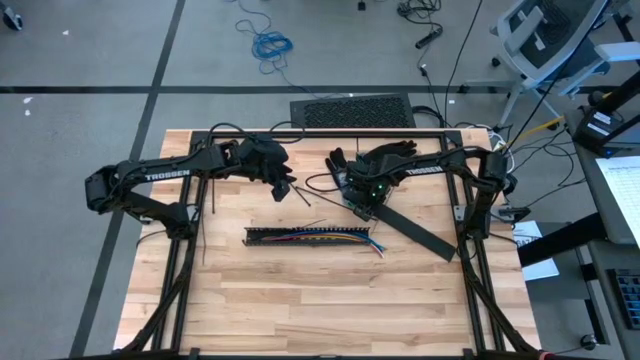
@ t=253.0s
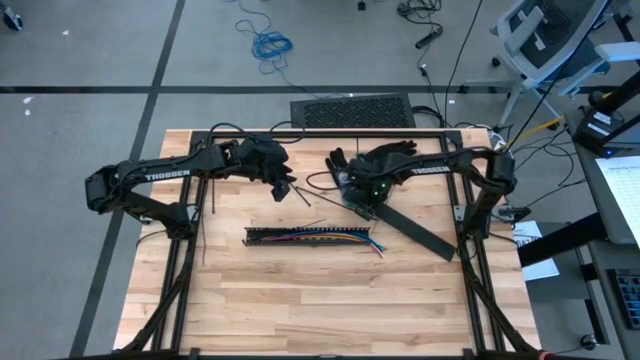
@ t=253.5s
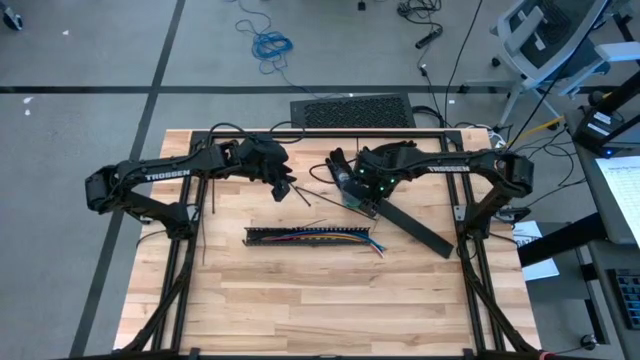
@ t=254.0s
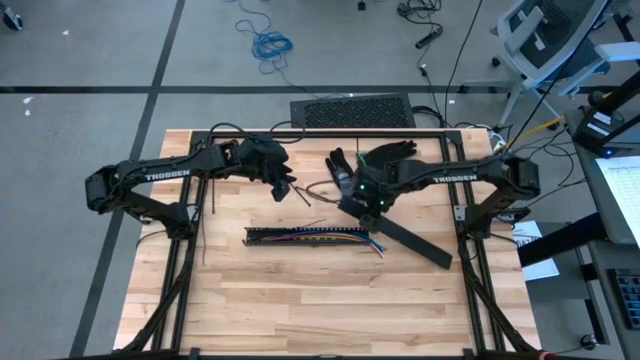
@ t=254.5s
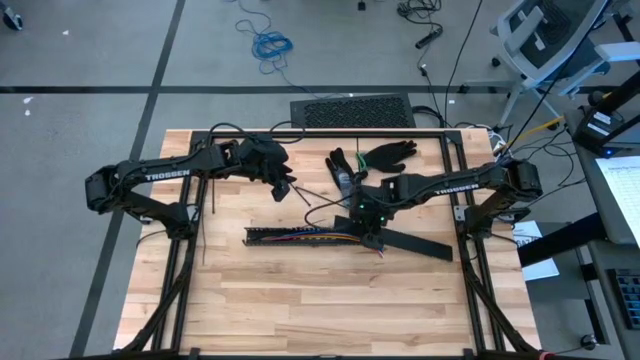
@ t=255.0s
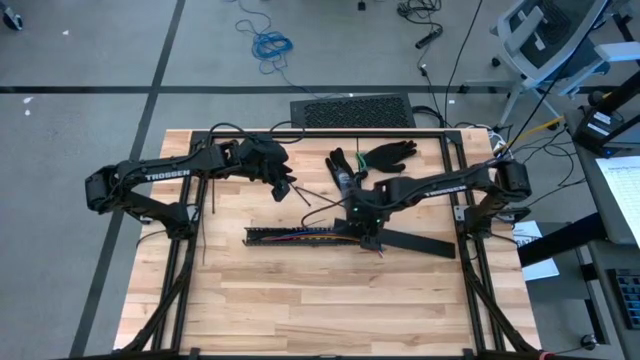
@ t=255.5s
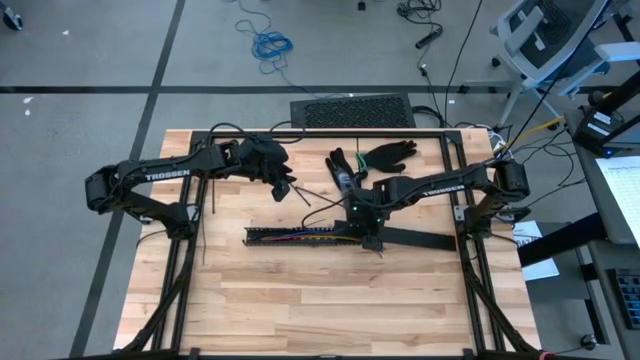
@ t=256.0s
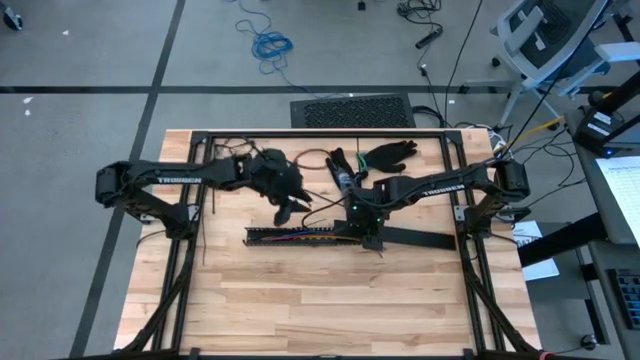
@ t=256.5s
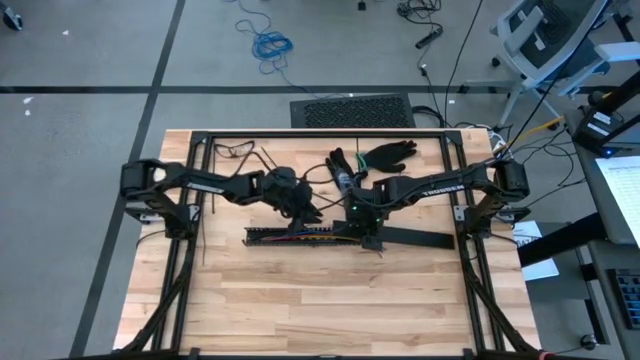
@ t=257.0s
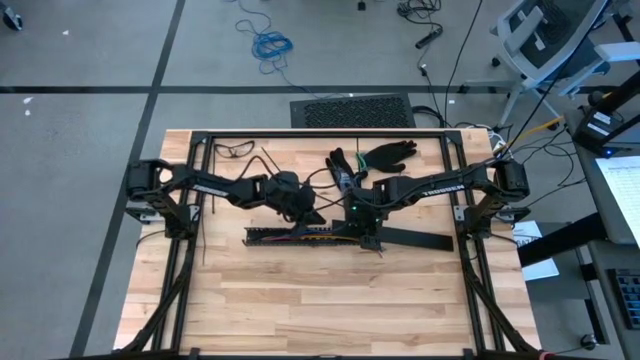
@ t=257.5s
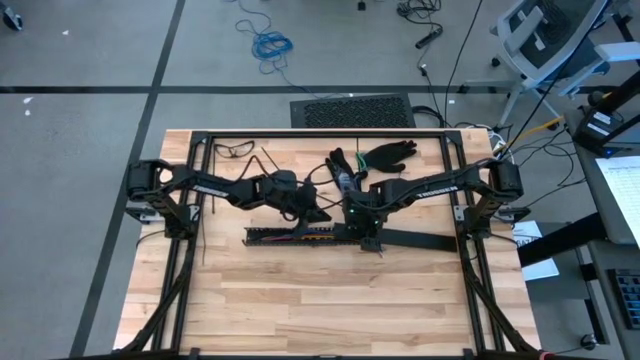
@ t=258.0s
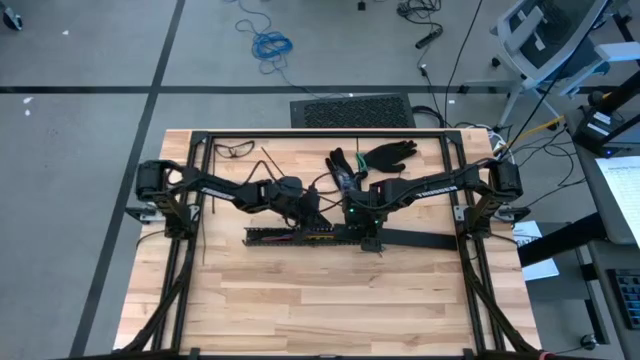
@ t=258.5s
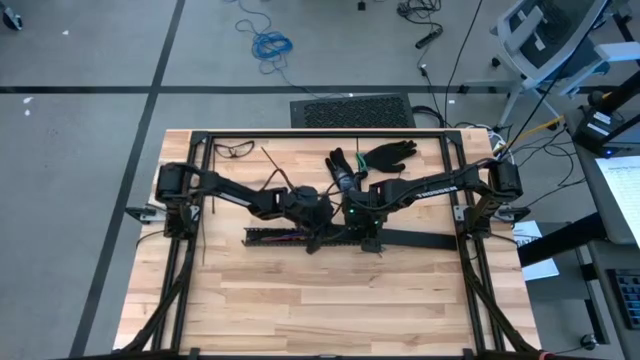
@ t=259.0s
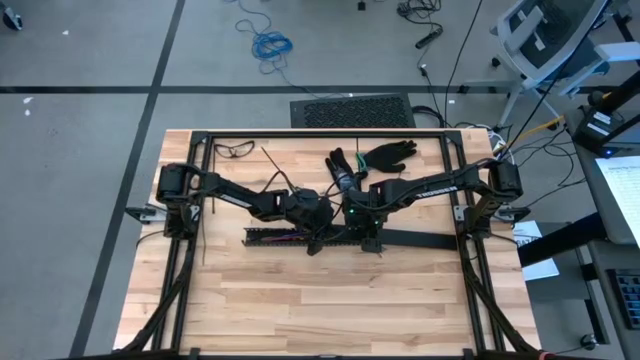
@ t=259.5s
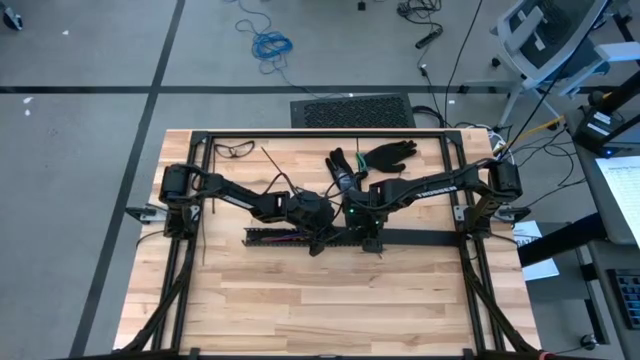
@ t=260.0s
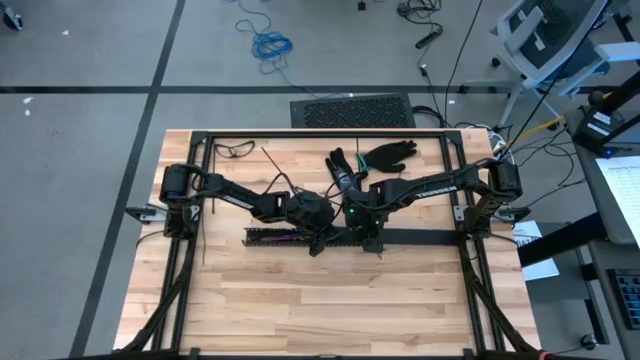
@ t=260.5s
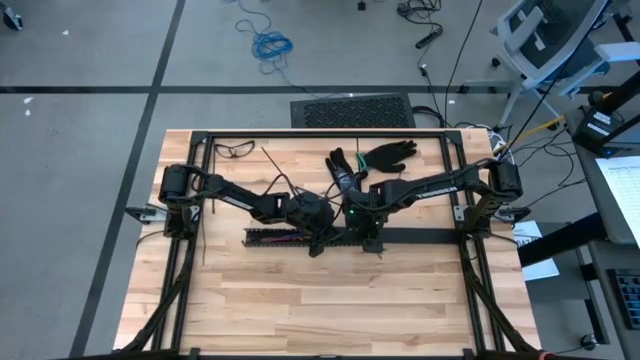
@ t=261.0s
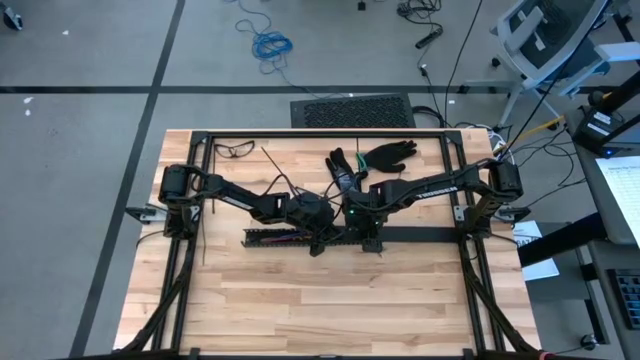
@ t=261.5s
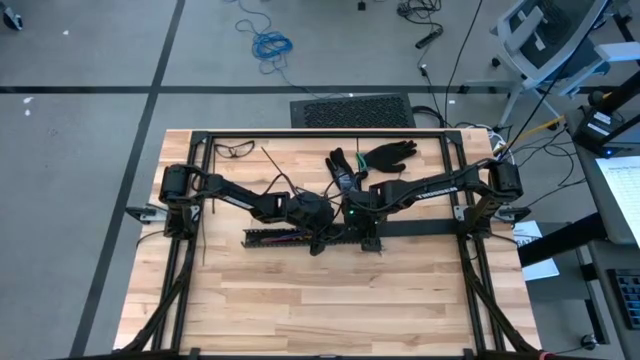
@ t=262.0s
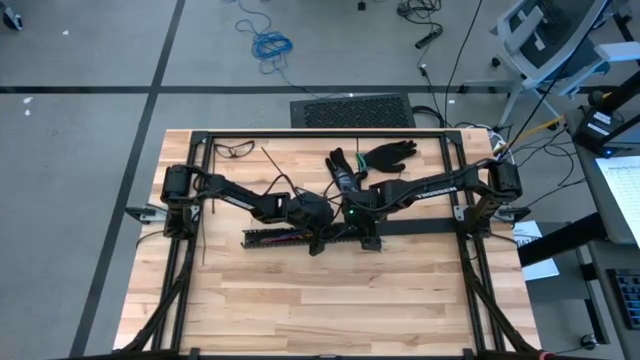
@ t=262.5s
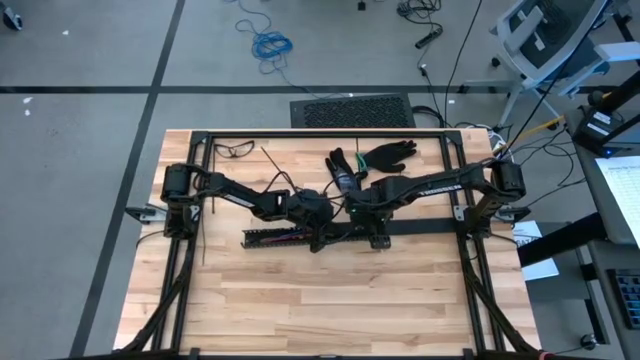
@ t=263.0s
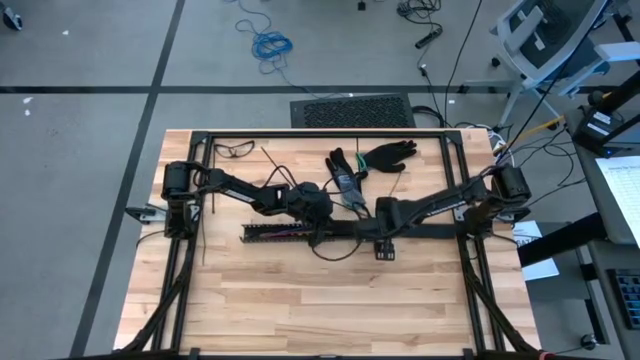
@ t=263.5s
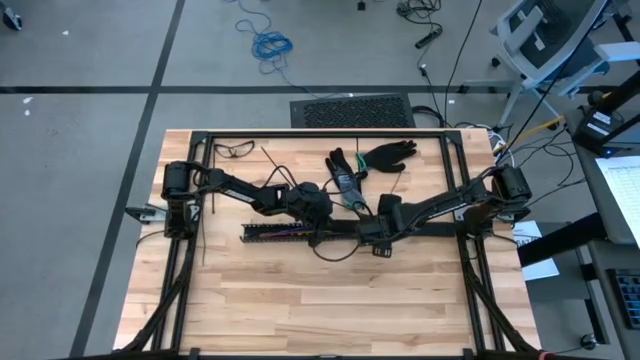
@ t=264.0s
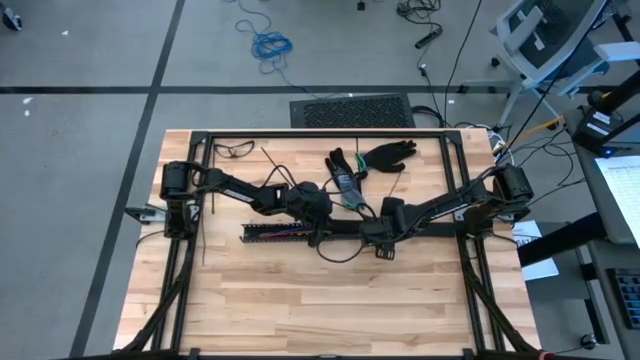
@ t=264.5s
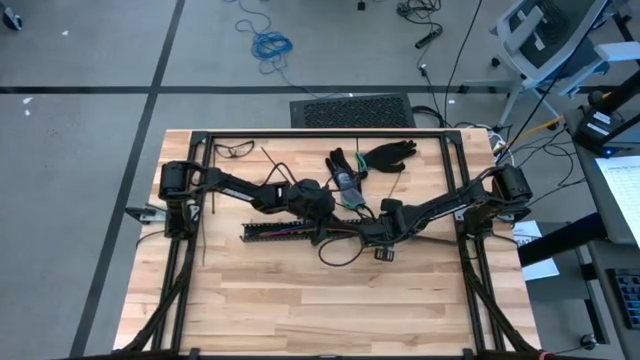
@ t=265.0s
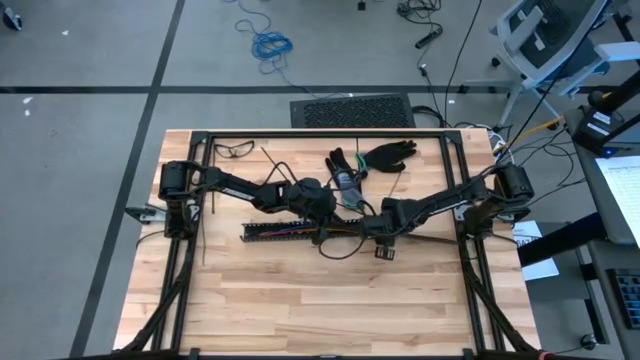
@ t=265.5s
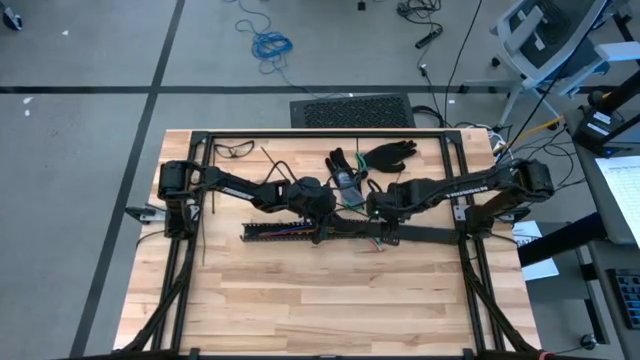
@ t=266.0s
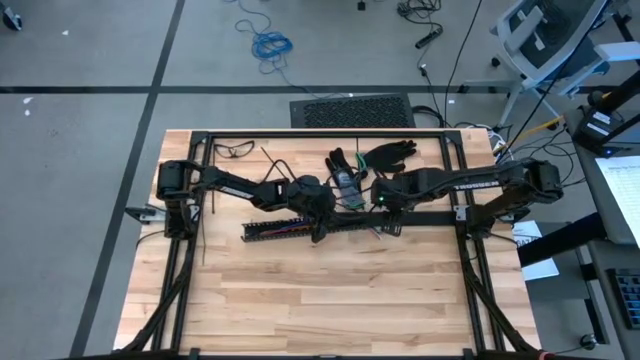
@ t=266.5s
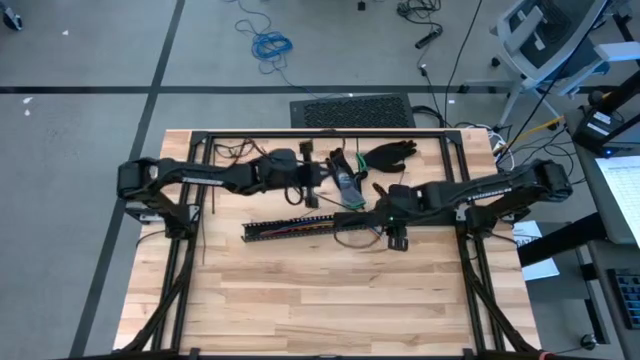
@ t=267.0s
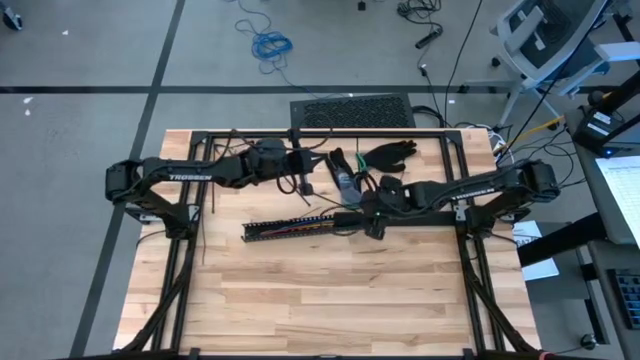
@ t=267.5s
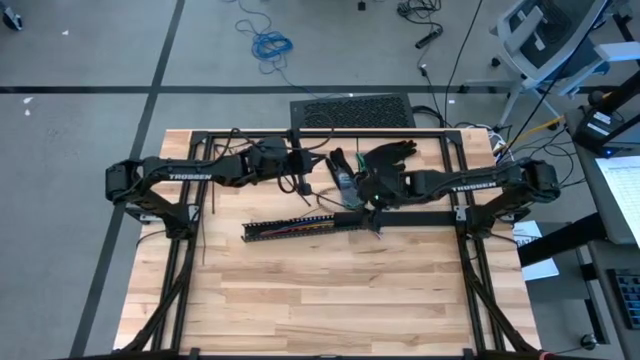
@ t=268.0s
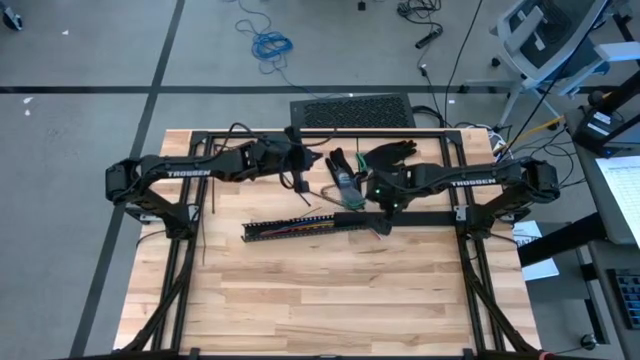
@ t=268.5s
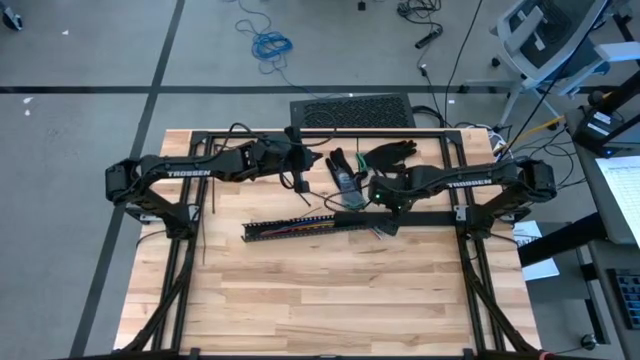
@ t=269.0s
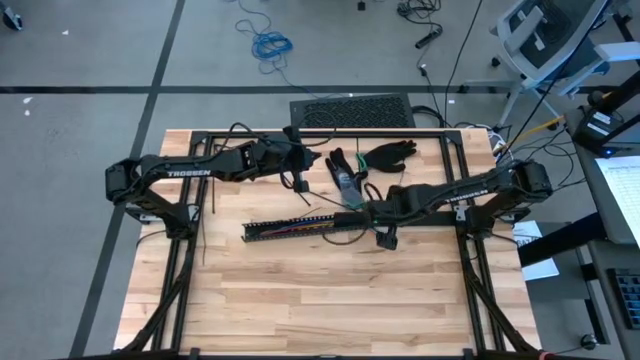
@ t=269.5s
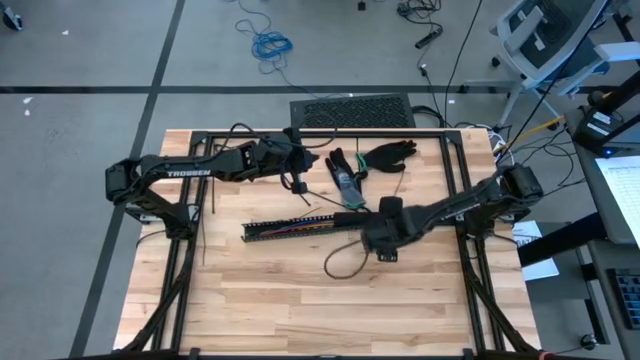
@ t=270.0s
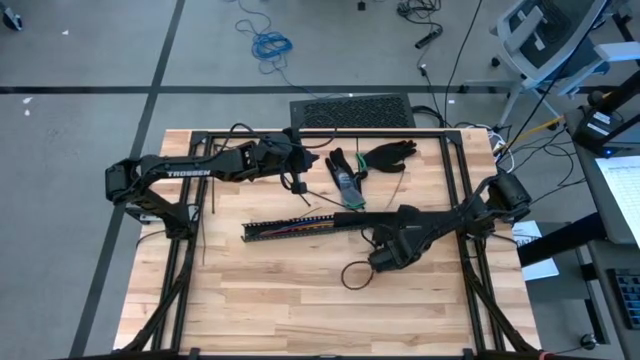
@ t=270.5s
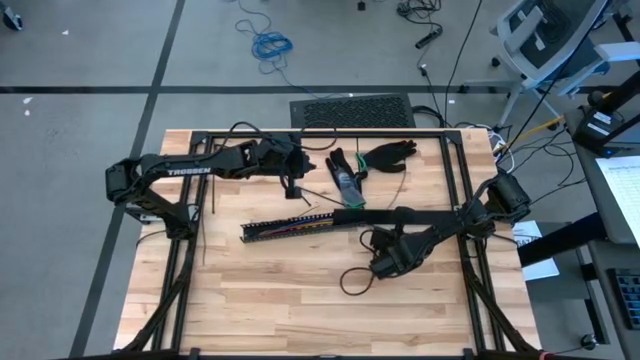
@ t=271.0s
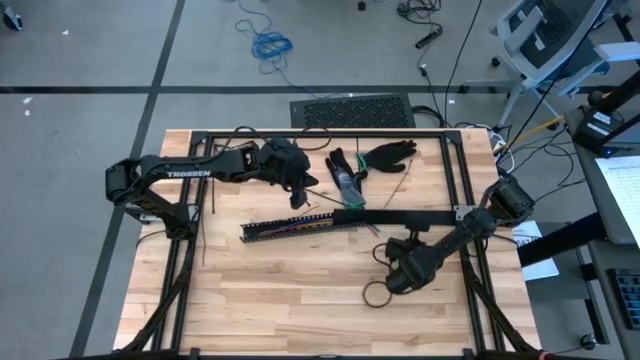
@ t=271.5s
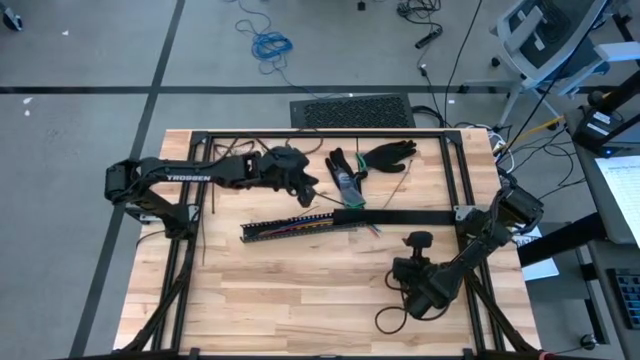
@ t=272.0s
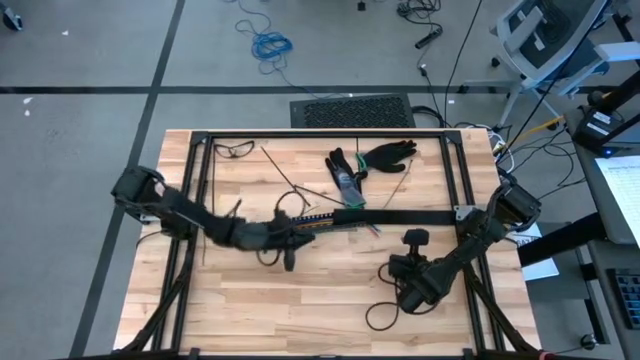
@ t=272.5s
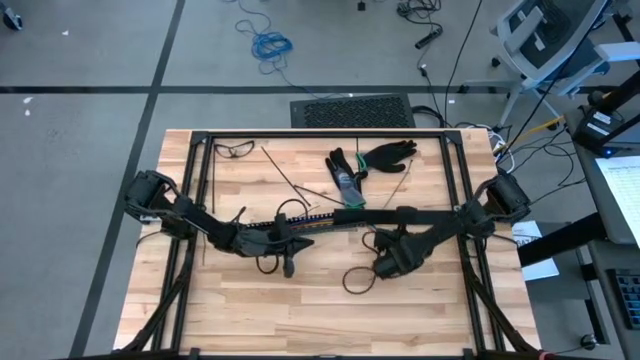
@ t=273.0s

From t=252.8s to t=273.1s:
Task: Ziptie cables
Close the black cable duct
